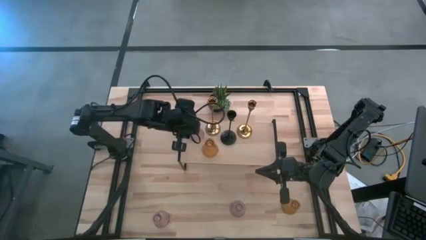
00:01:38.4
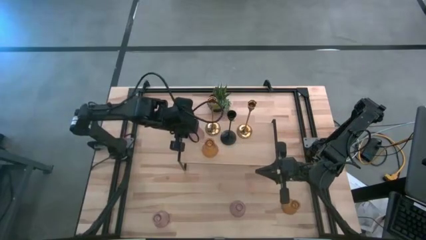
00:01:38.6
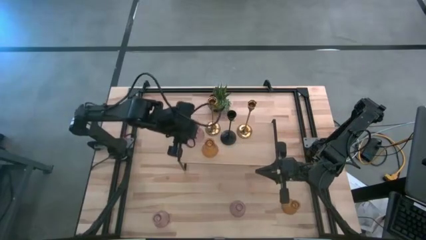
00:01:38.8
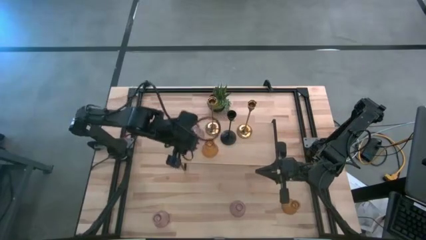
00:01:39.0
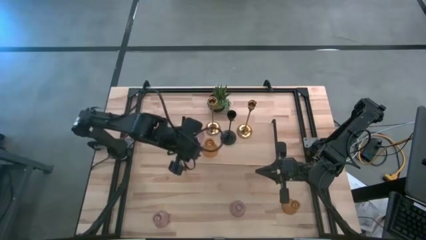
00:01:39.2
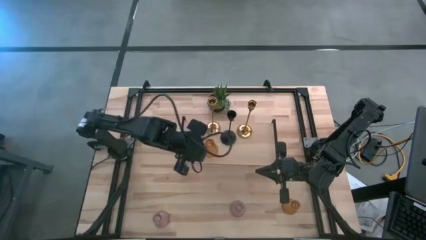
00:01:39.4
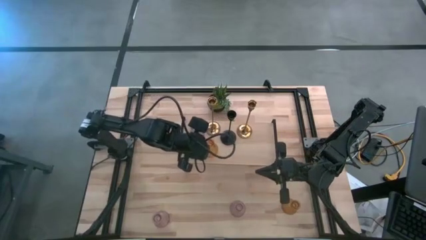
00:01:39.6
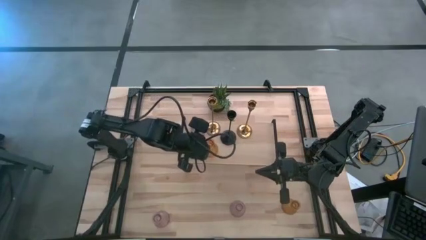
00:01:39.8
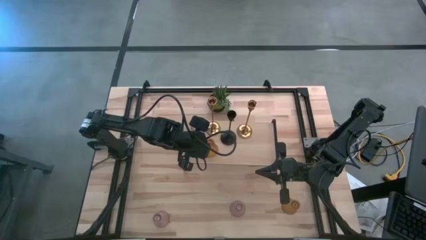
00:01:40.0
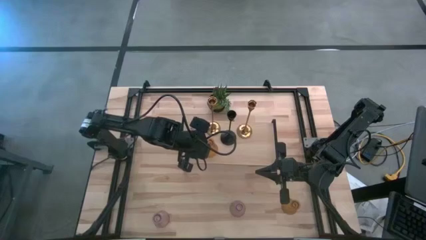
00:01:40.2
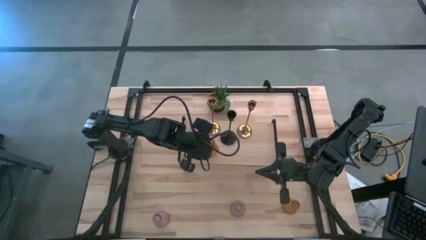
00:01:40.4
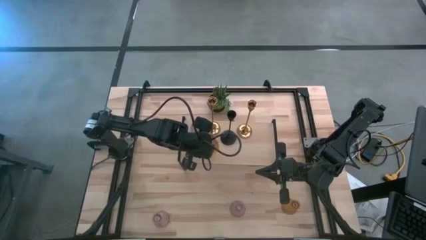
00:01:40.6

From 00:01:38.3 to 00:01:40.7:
Task: Pick & Place candle stick holders
Adjust the orange glass candle holder on the shelf

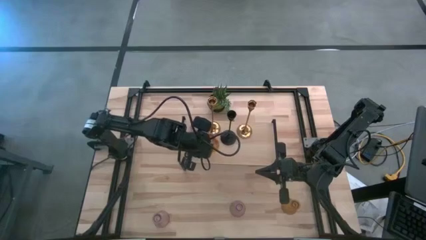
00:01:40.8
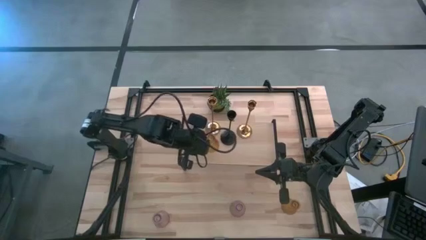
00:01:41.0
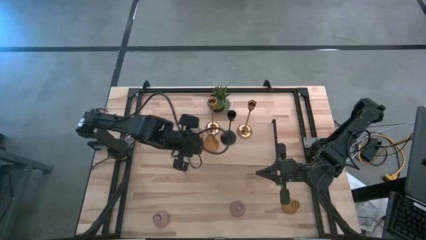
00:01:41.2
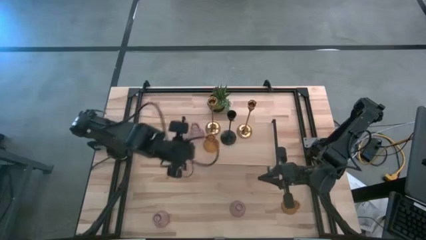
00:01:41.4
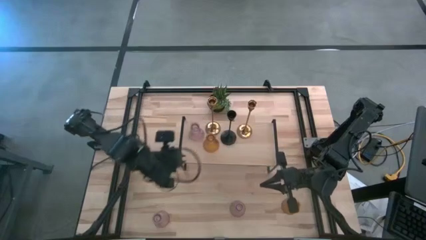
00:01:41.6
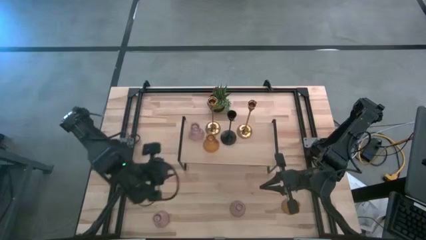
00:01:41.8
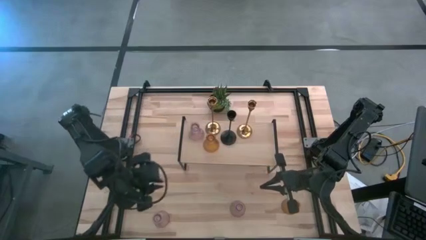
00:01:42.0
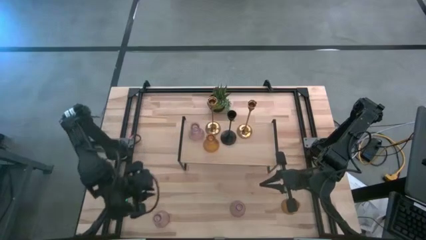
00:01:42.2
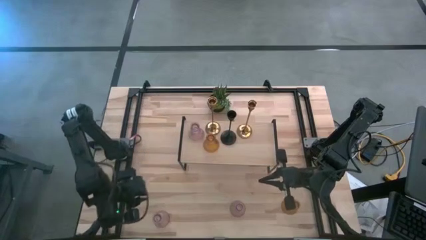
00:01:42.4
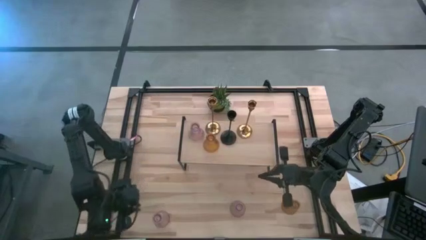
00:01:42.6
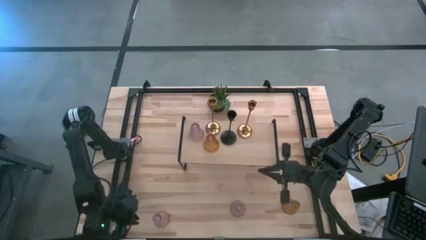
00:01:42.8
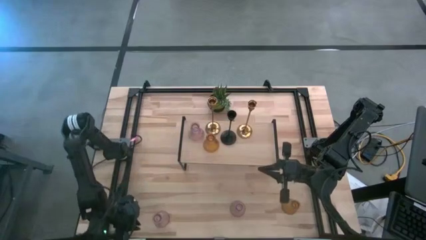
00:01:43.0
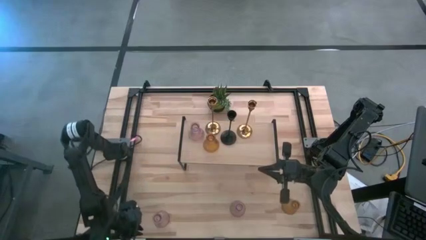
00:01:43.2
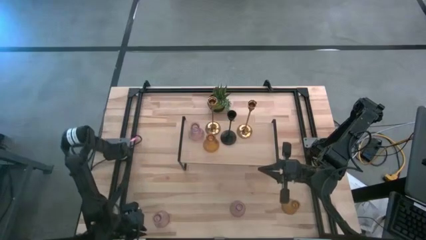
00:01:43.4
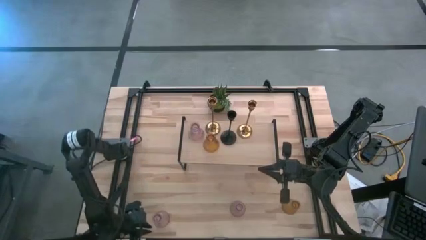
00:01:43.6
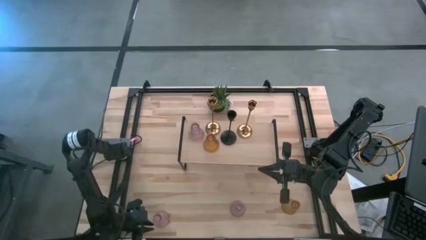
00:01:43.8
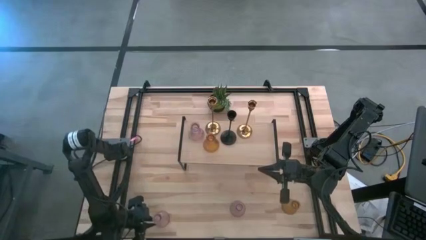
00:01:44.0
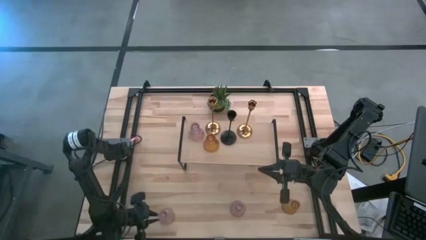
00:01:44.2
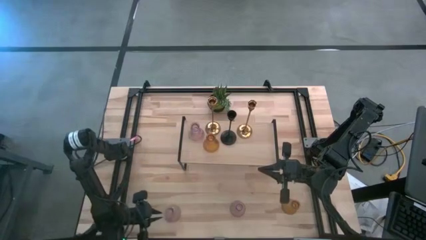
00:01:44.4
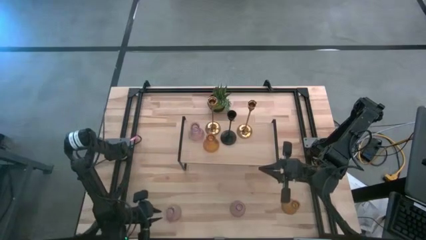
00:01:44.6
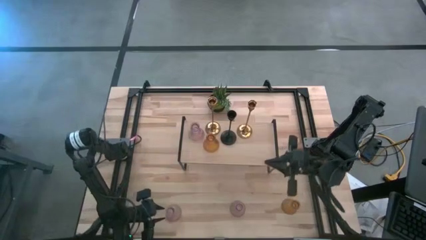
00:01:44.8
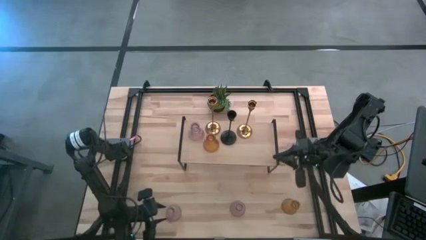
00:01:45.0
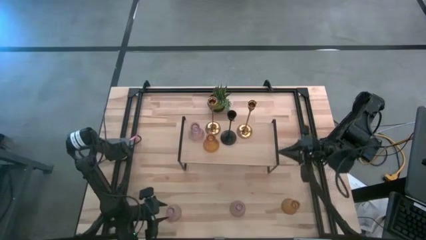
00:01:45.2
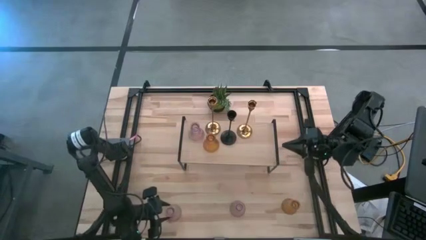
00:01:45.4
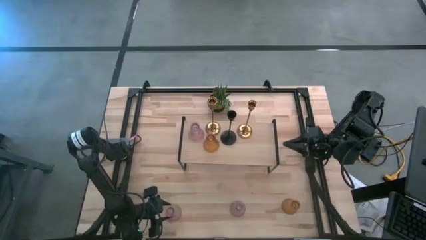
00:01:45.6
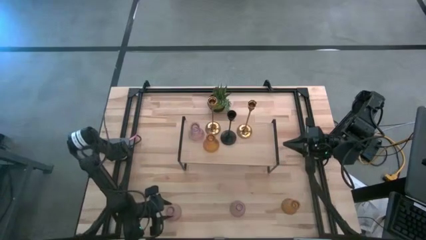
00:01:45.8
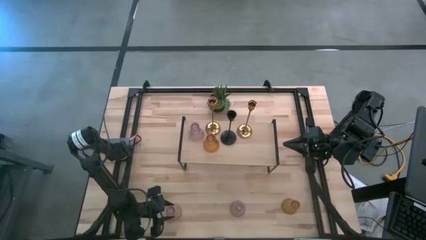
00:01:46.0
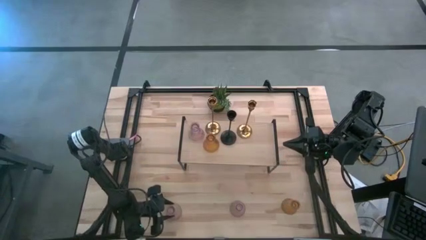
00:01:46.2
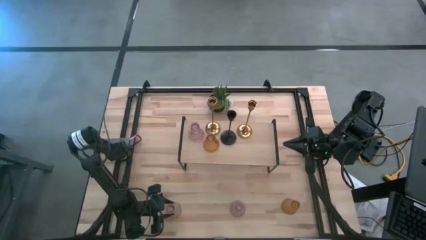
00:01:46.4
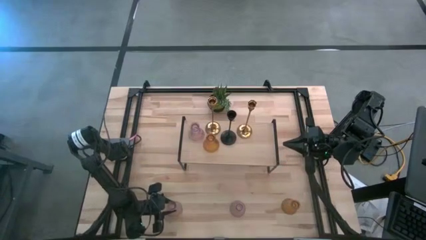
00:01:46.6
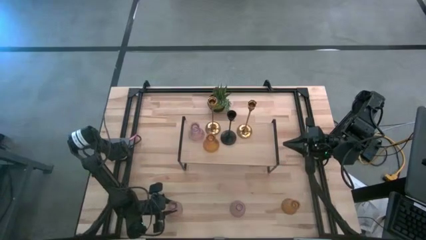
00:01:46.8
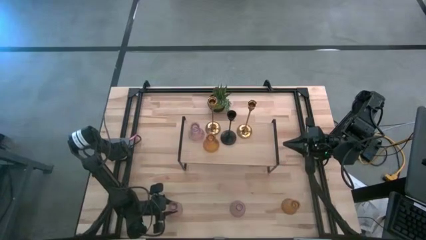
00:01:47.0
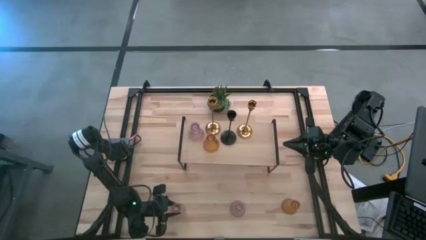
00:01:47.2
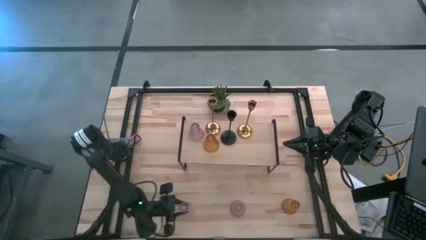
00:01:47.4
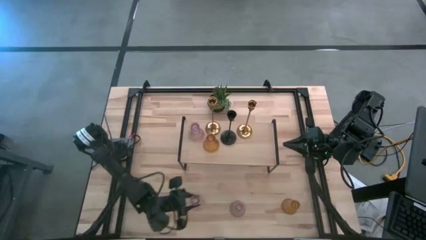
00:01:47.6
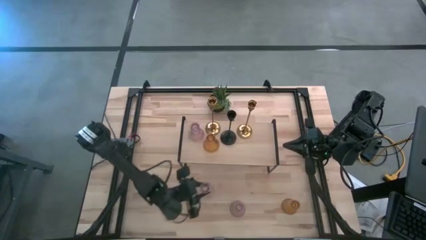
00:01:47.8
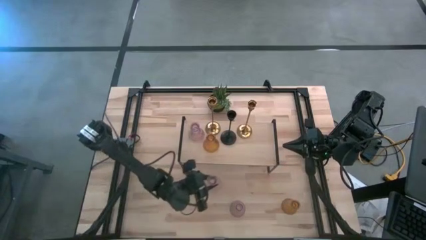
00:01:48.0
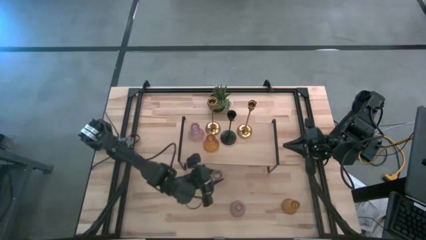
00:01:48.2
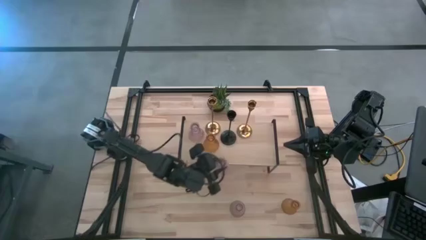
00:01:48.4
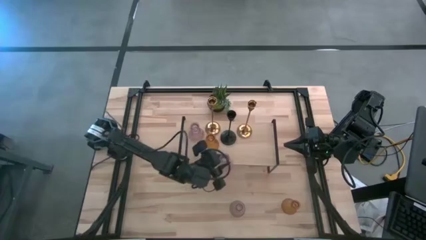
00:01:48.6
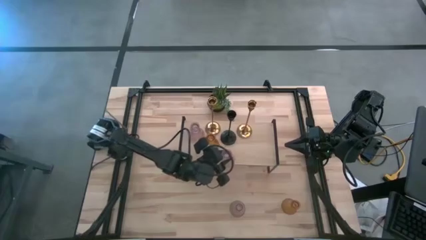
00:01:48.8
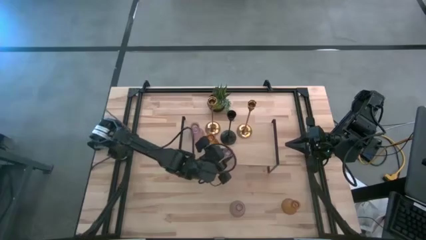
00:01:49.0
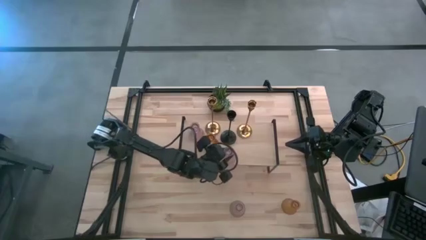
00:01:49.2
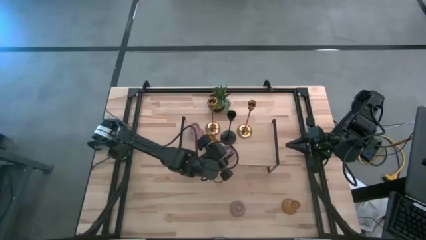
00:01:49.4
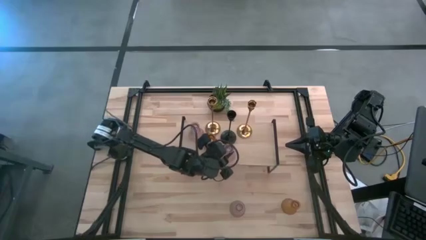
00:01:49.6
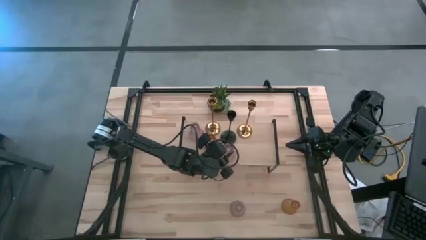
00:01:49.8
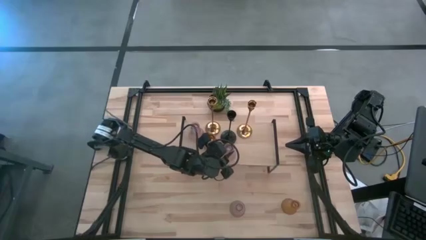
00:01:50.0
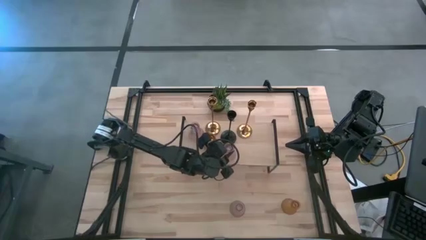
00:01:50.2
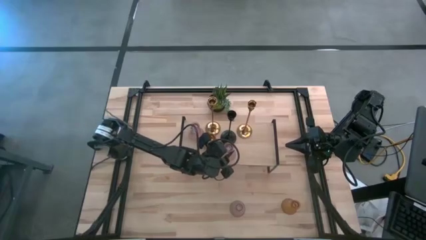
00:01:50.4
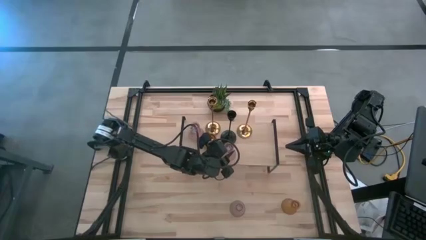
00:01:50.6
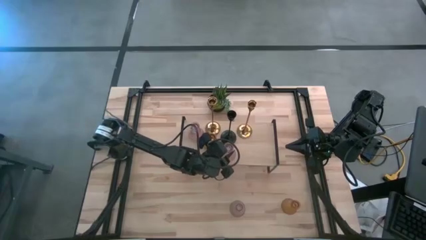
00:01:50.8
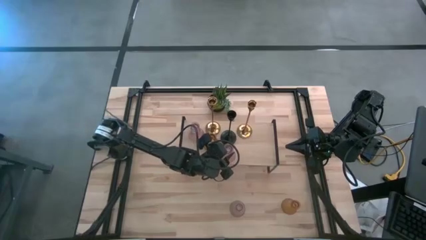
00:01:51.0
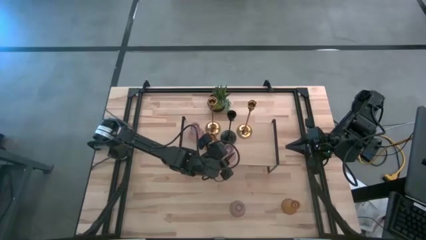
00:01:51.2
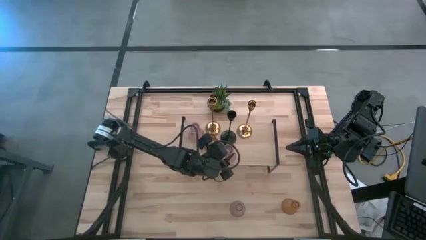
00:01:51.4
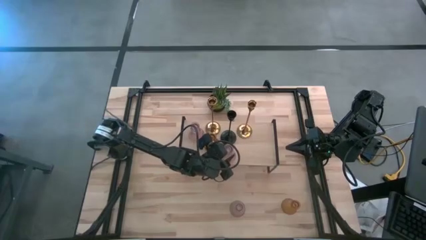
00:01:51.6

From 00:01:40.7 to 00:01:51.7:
Put the left pink glass candle holder on the shelf

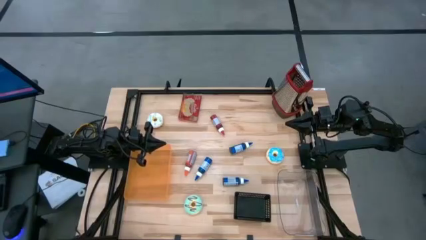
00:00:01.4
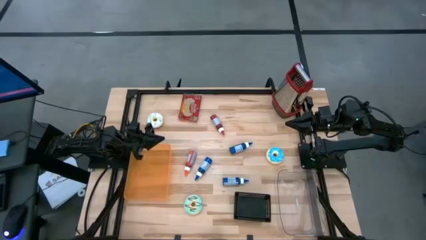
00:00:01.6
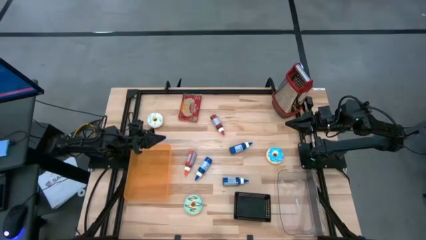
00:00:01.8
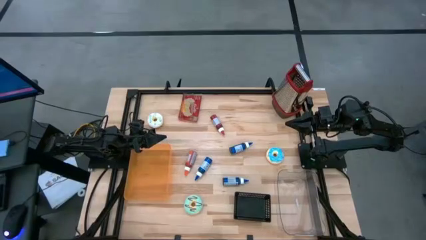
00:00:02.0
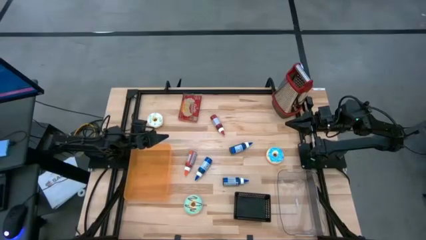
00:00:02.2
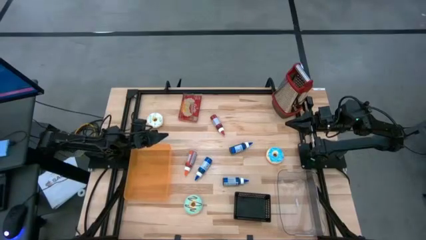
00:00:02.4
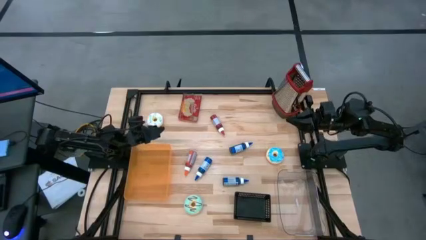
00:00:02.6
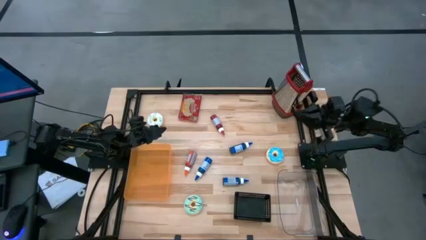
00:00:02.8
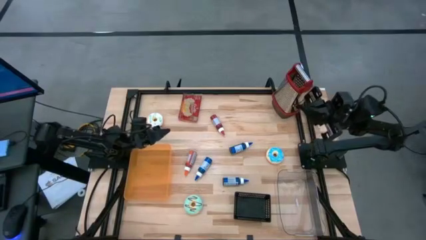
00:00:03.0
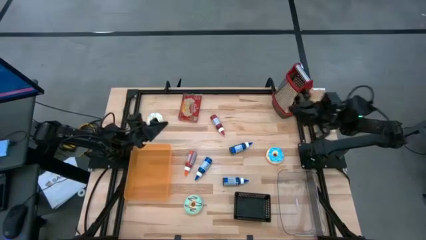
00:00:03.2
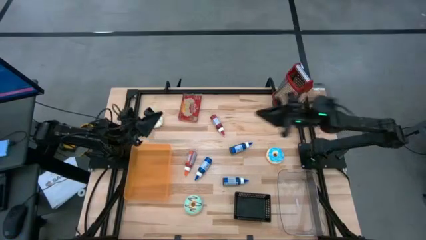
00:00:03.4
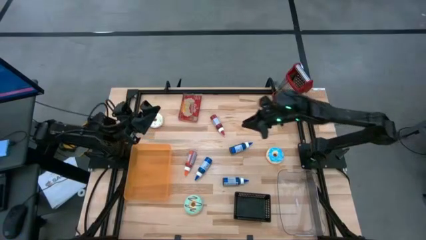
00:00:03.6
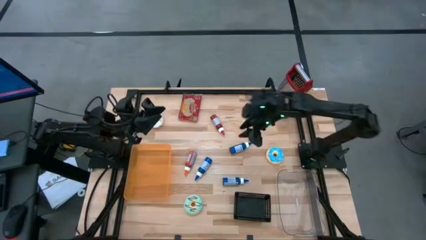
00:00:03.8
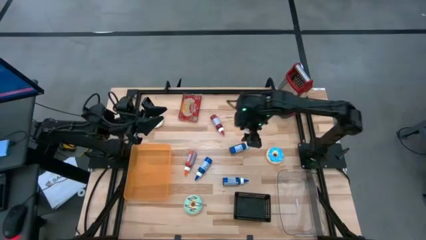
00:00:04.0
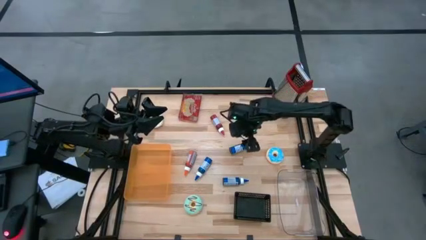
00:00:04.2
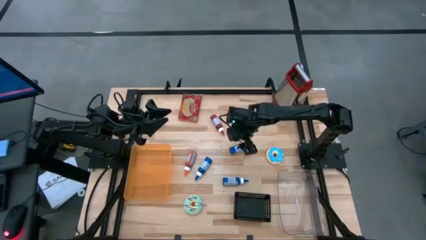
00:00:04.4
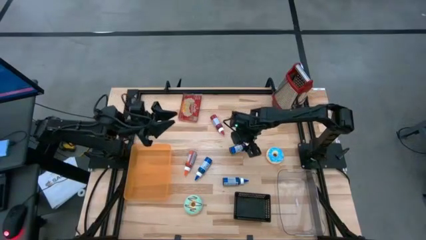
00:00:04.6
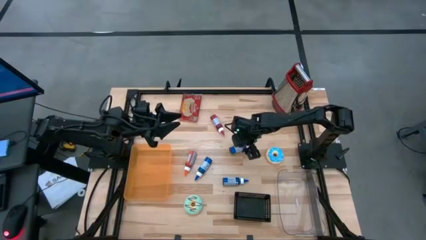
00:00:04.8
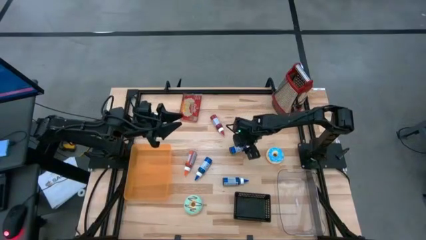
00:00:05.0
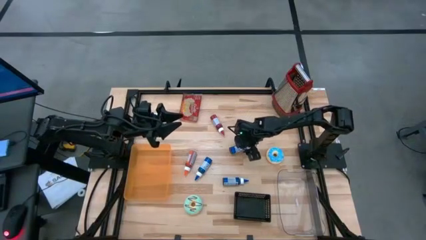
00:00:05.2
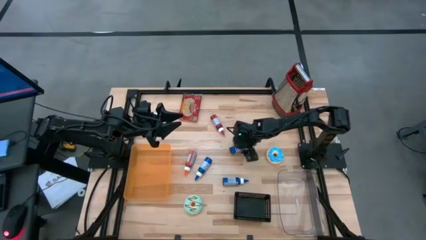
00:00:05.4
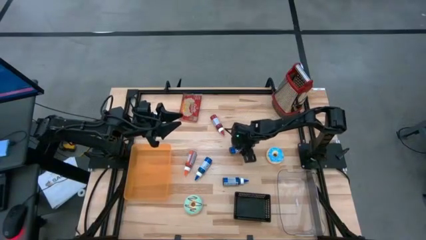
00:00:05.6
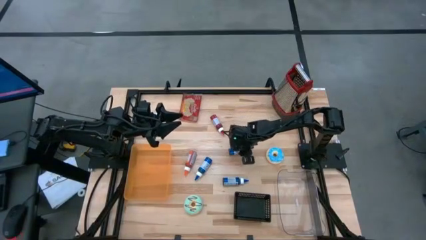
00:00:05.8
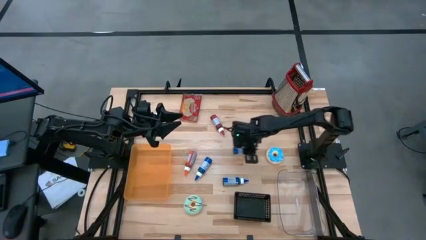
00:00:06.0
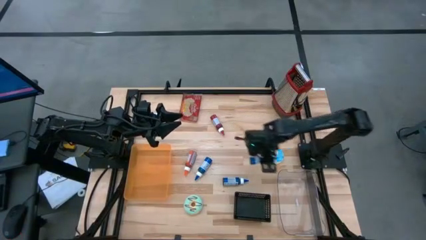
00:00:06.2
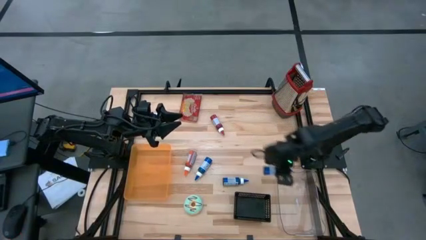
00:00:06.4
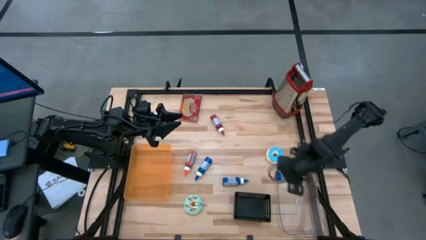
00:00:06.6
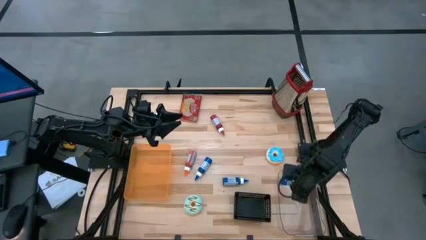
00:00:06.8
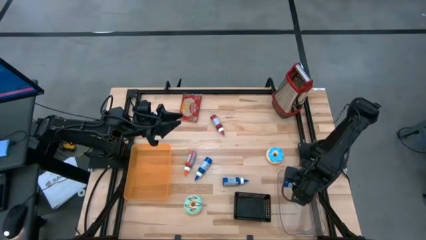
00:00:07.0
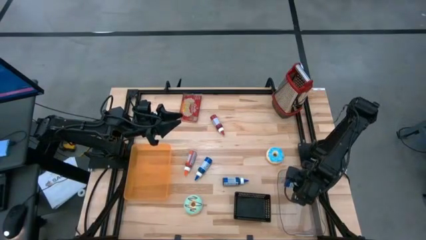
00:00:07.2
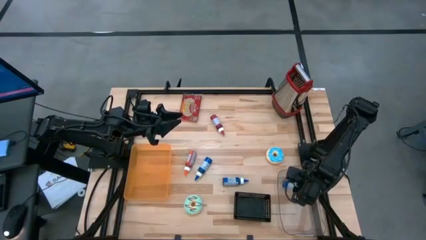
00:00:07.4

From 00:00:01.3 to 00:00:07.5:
Task: Pick & Place Food Item
Put the top blue food coloring bottle into the transparent bin
